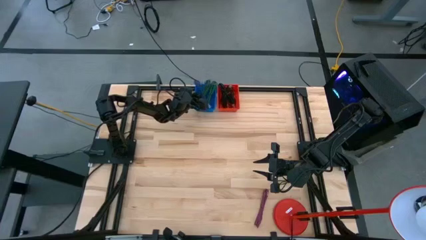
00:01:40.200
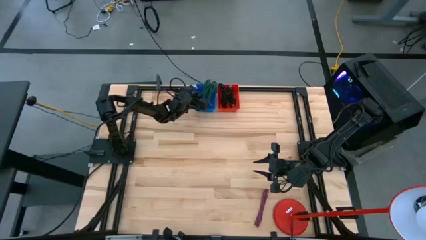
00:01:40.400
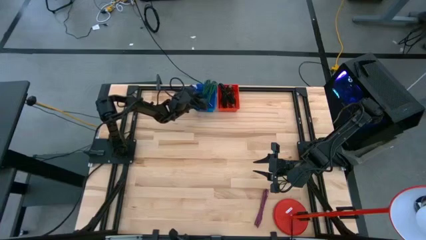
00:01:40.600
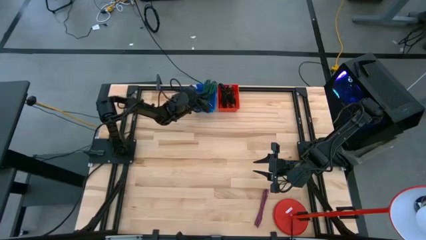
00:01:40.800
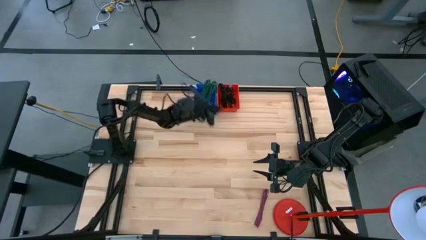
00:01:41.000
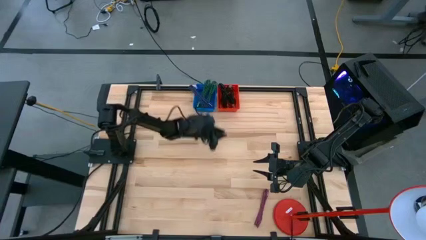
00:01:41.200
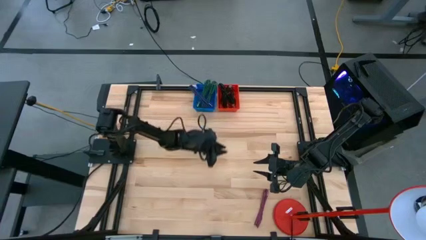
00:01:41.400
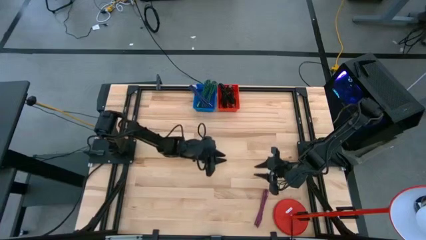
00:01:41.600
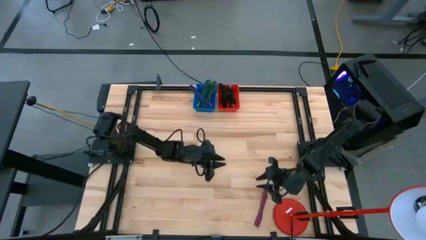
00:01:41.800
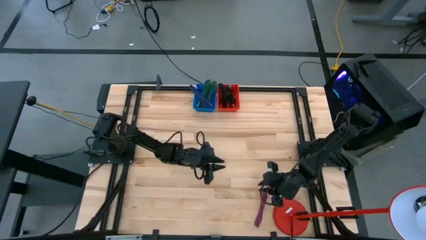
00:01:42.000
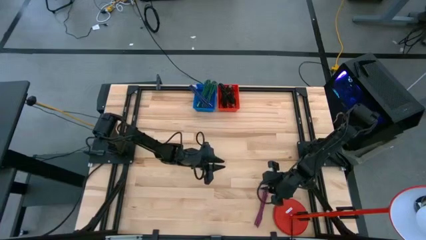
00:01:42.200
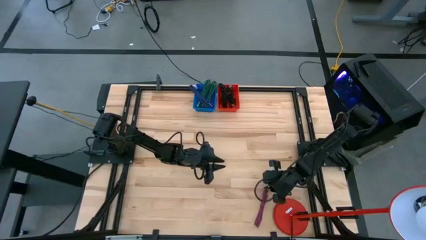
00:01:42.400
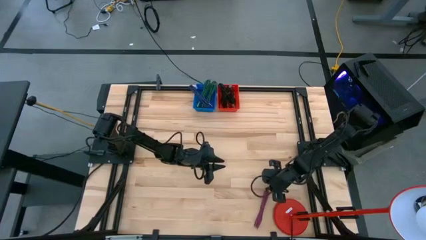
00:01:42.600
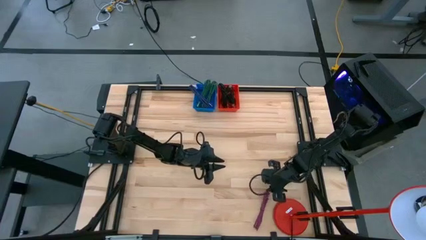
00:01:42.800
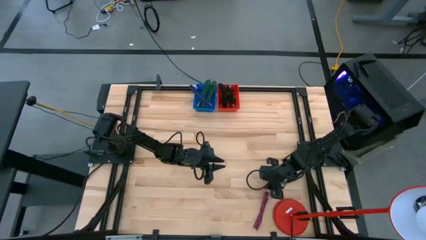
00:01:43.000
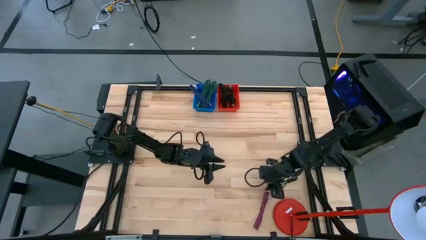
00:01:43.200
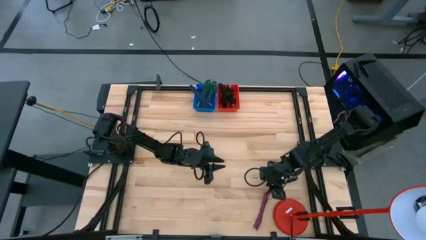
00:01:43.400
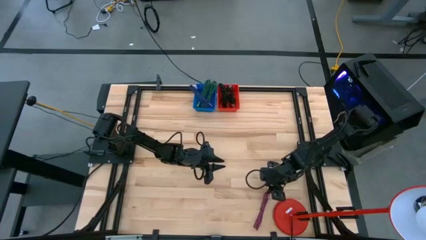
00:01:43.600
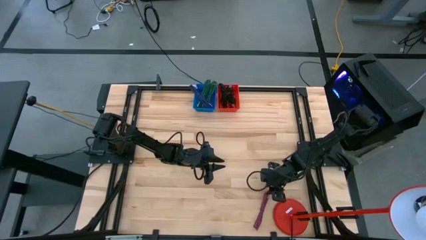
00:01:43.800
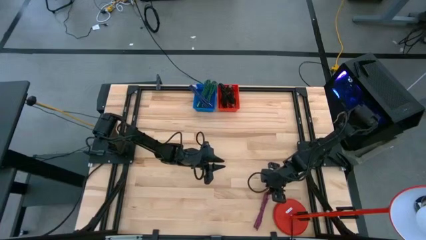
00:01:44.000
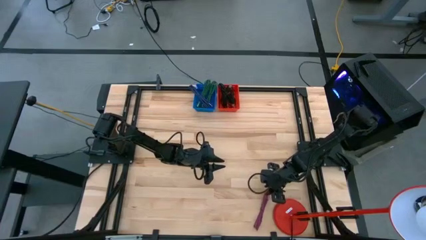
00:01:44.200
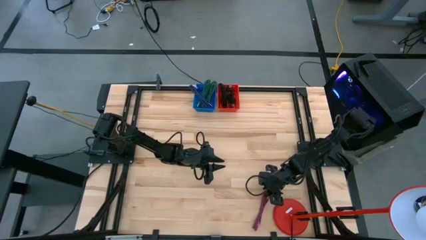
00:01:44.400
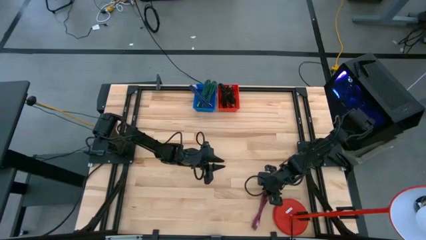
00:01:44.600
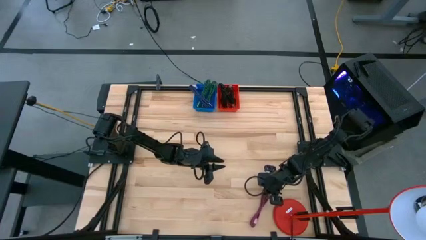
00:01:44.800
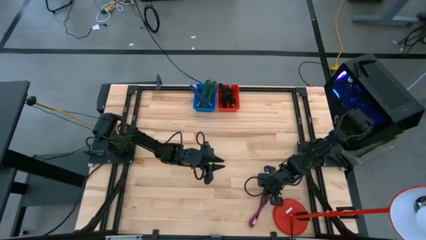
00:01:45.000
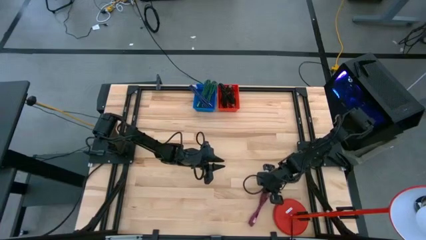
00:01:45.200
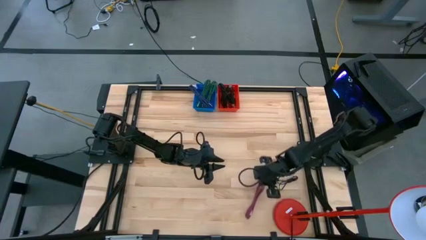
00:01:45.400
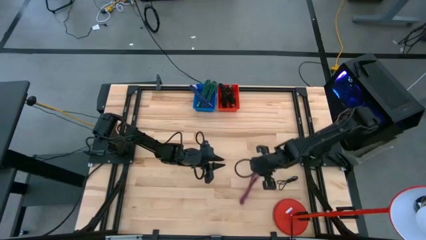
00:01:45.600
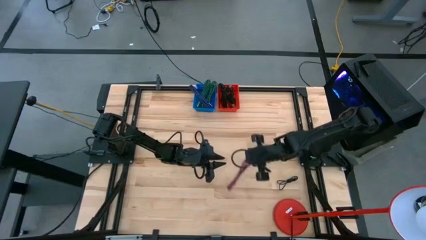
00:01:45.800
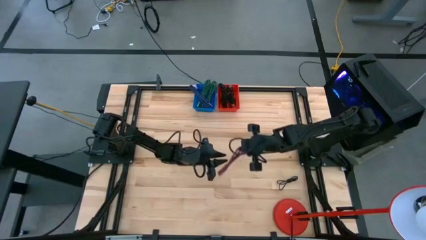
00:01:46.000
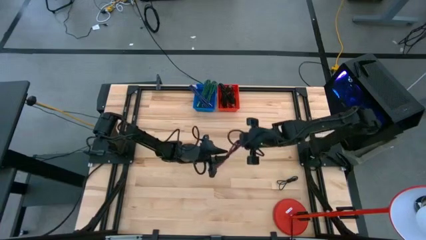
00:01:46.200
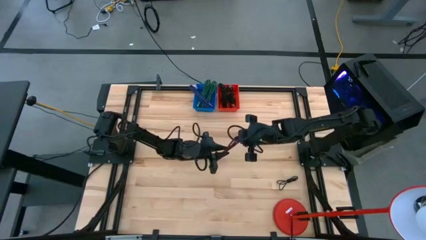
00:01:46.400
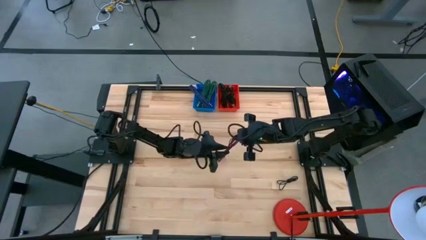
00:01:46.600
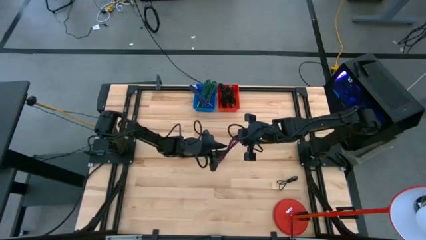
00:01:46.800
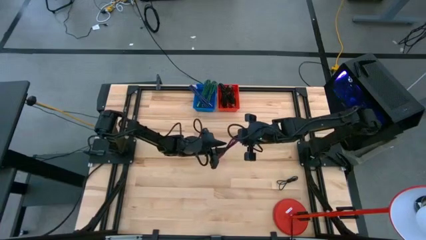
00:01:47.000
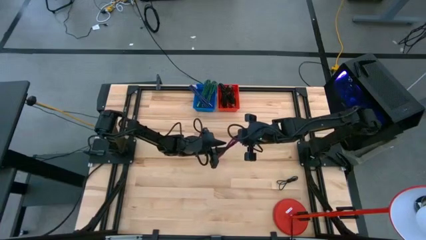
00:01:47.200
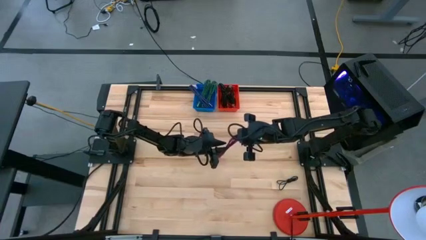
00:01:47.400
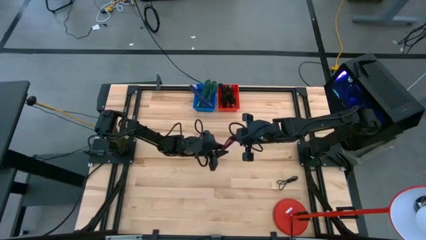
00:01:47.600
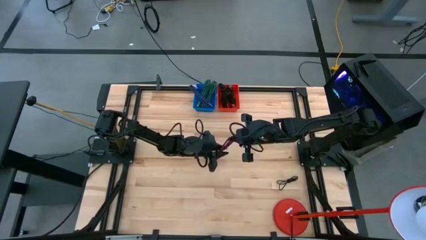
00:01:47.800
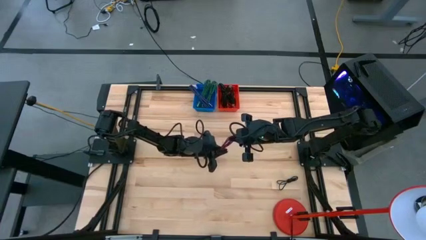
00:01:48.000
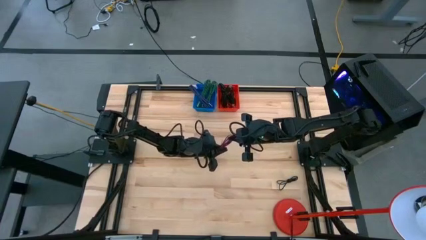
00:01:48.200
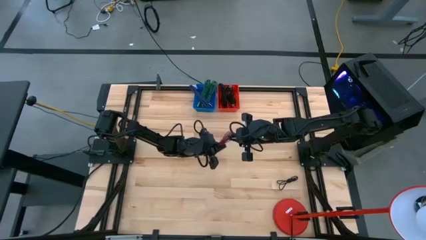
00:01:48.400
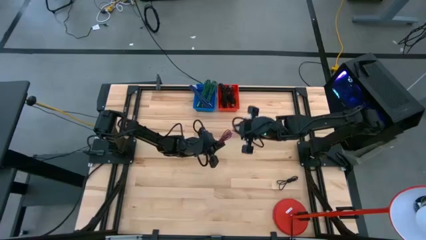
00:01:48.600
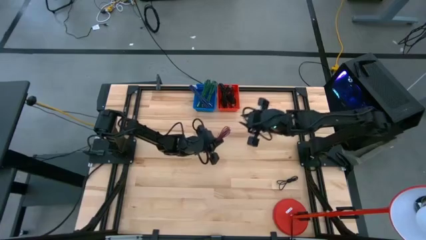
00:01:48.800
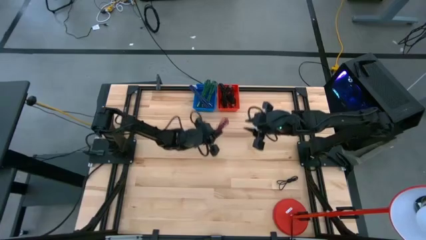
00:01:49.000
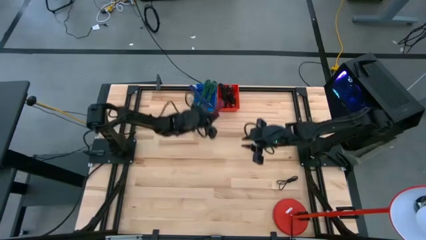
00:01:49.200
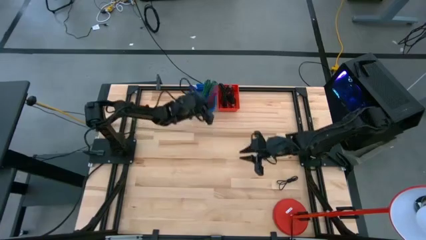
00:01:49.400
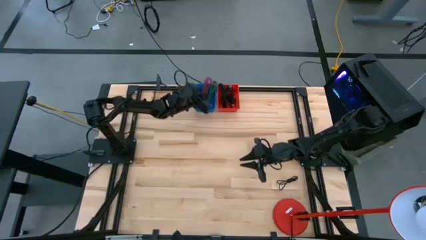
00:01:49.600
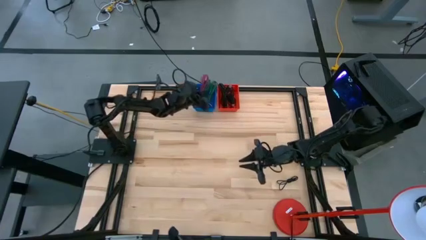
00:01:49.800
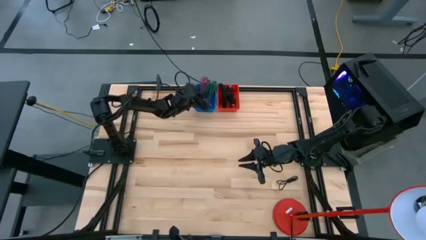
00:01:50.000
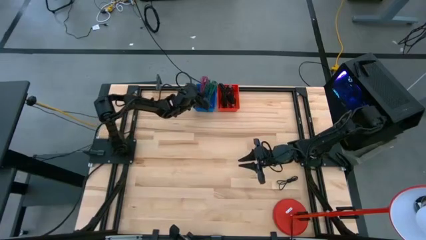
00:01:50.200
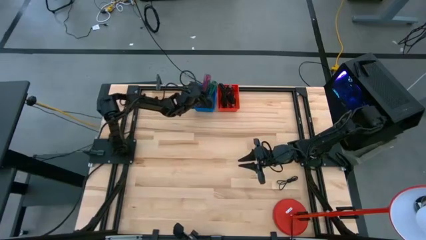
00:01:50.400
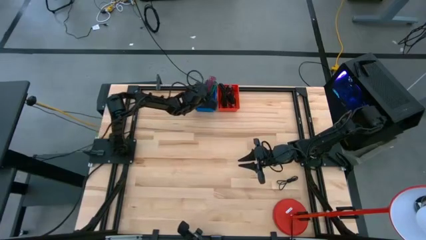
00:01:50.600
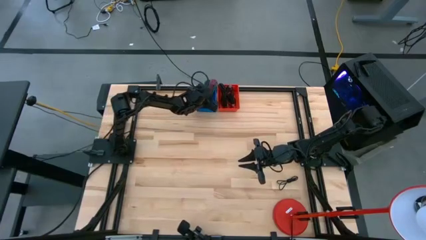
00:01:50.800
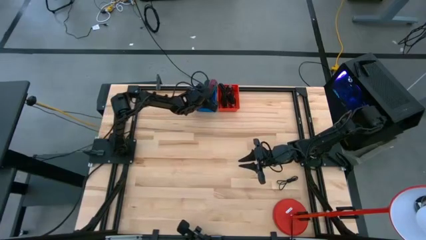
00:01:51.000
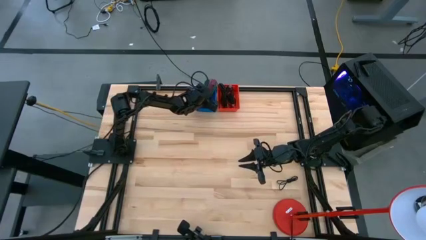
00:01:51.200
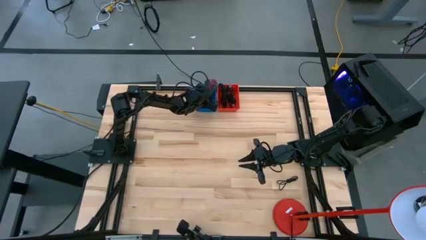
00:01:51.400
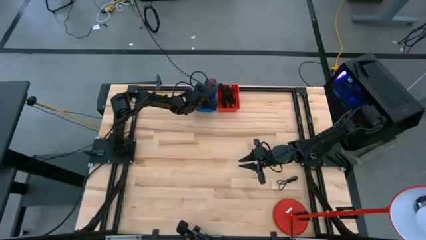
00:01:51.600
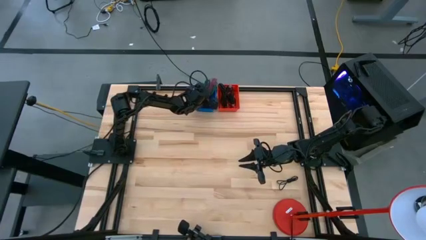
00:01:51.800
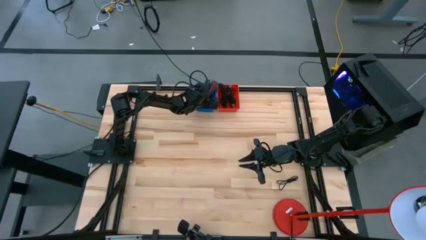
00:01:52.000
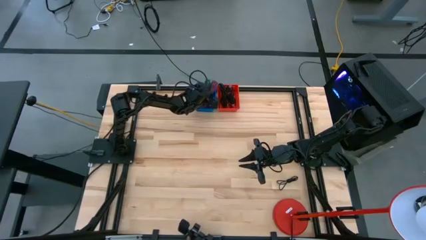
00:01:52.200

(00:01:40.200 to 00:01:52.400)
Task: Pick & Place USB Port
Put the pink charger cable into the blue bin

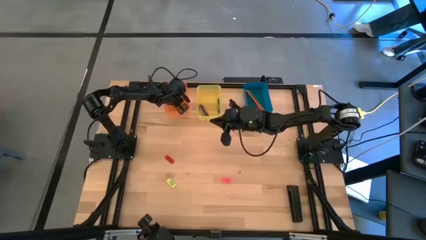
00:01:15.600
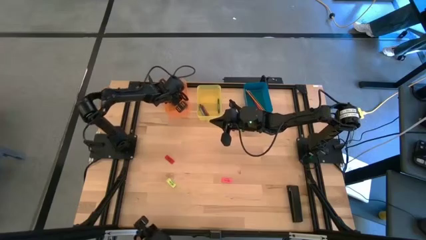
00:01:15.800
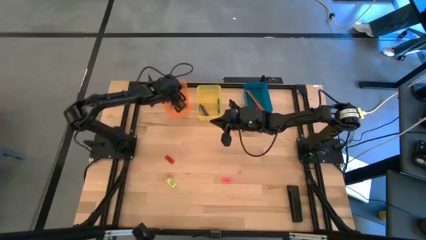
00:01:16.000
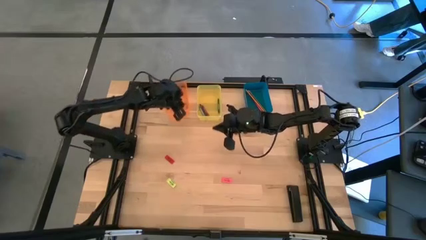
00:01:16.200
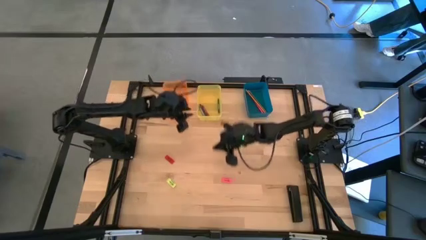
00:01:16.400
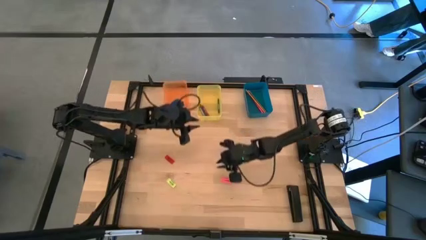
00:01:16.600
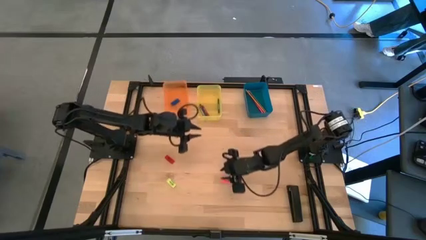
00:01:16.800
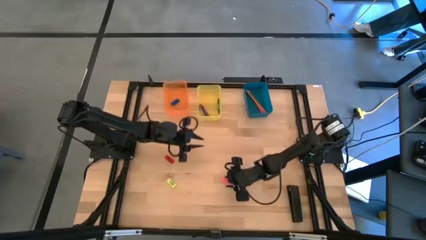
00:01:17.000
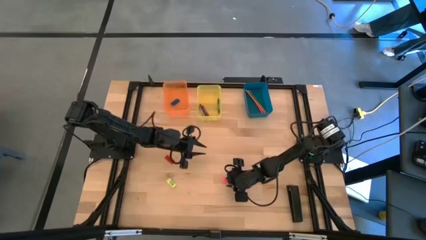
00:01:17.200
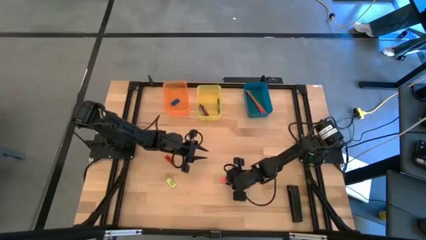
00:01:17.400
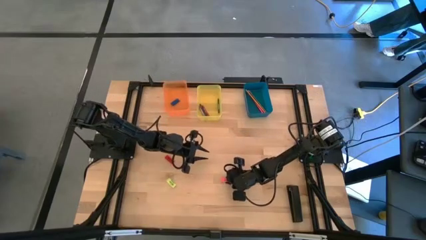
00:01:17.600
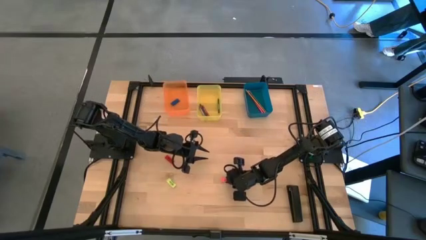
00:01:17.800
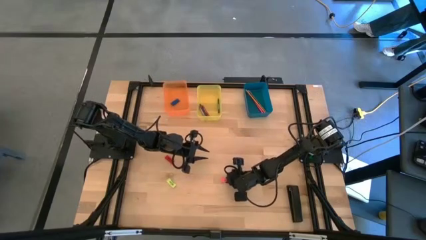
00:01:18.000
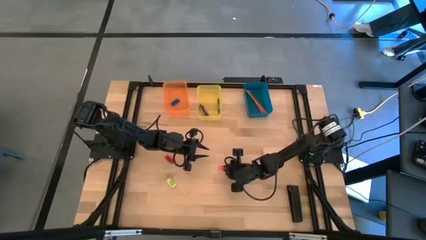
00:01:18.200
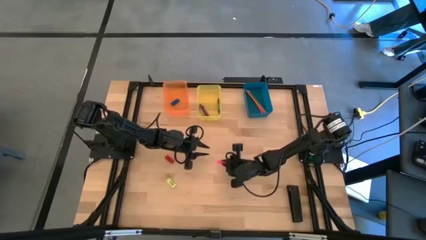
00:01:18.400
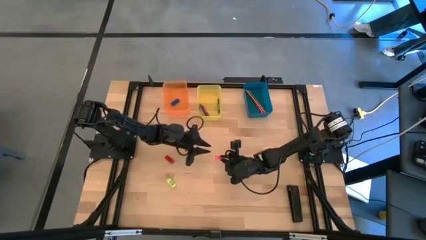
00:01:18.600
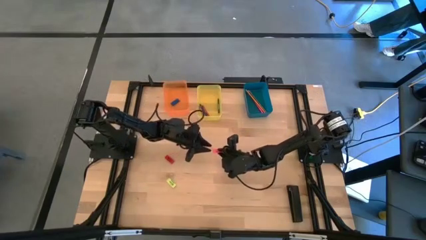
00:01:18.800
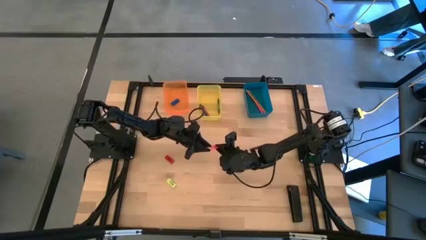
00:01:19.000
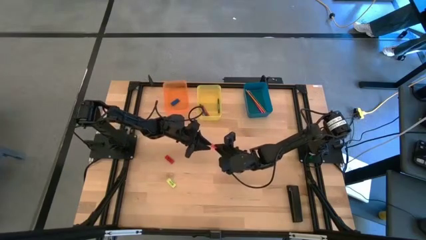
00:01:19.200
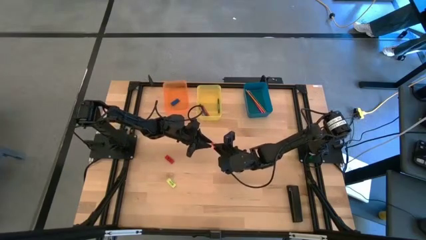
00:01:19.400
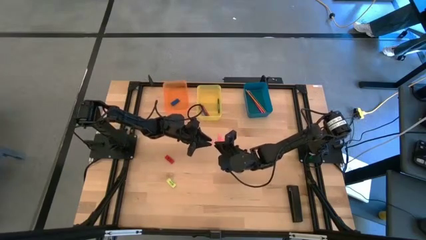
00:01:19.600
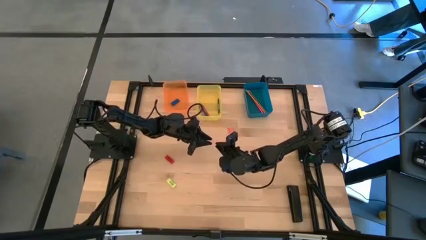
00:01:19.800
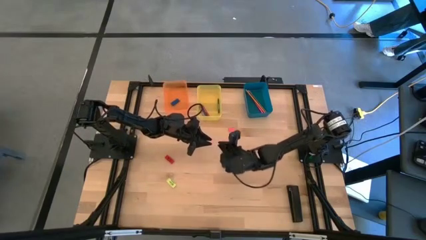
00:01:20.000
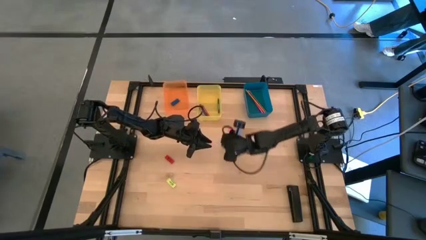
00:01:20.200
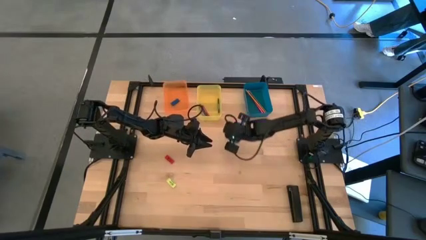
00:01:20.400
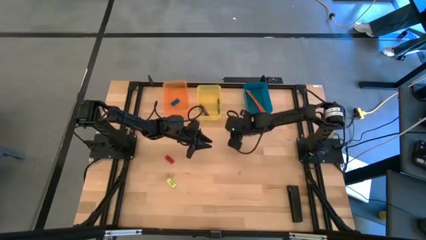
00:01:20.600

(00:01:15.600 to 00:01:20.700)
Task: Sort crayons/erasers/pens/pencils in bins
Put the pink eraser into the orange bin
